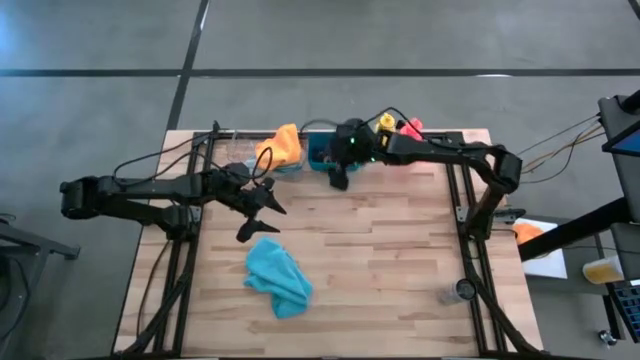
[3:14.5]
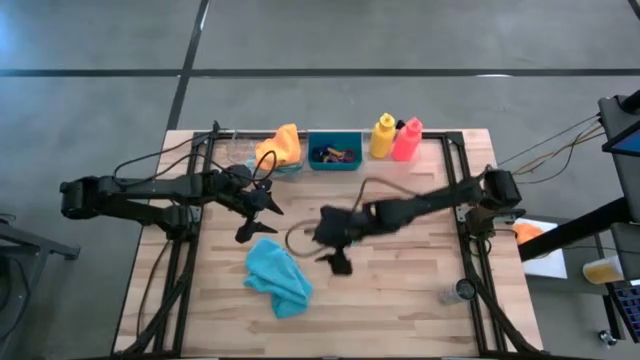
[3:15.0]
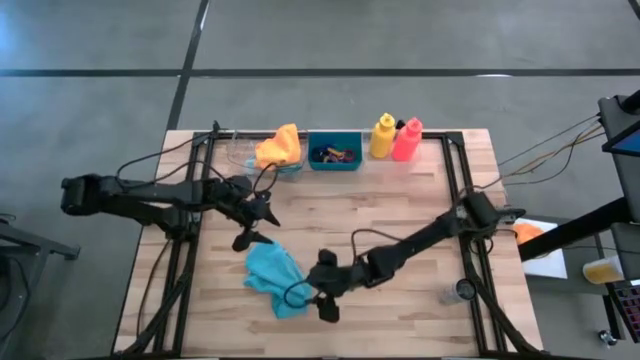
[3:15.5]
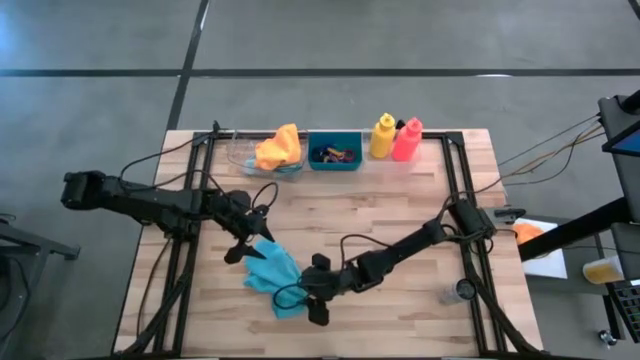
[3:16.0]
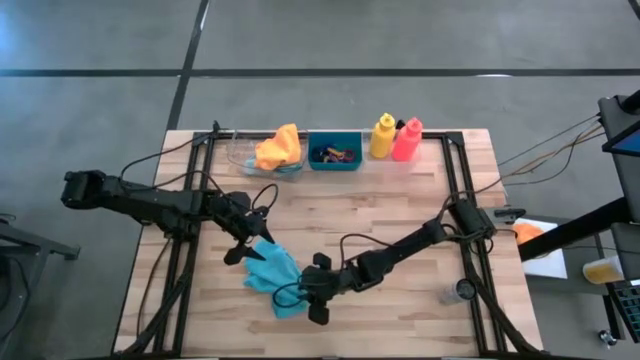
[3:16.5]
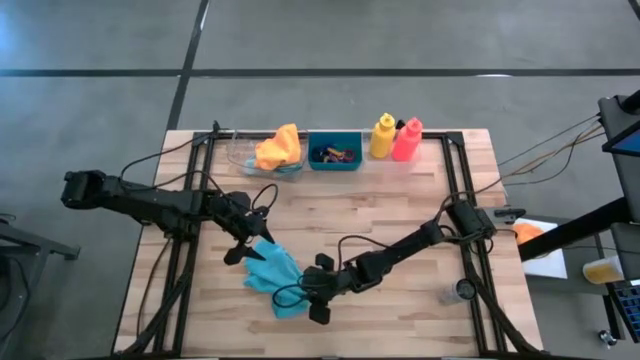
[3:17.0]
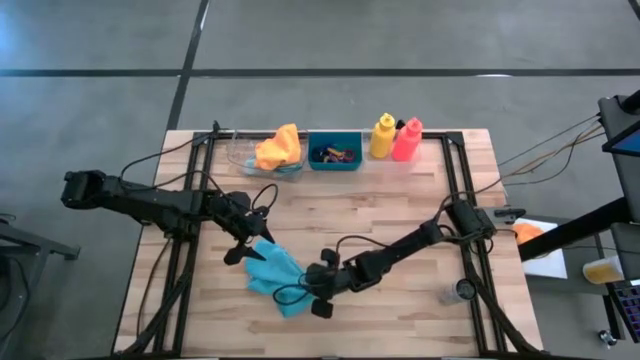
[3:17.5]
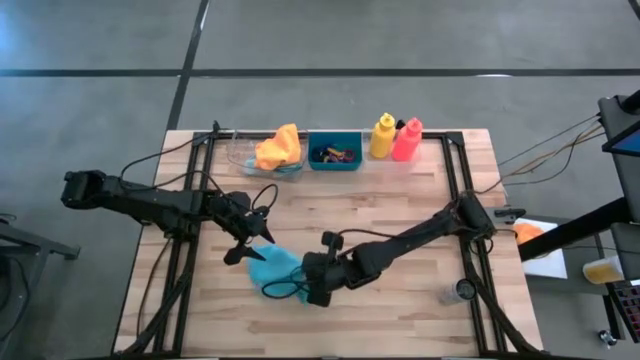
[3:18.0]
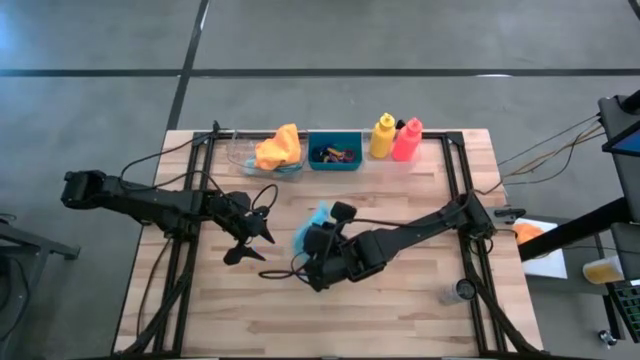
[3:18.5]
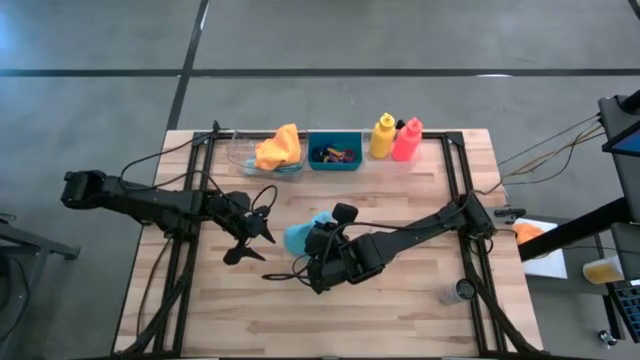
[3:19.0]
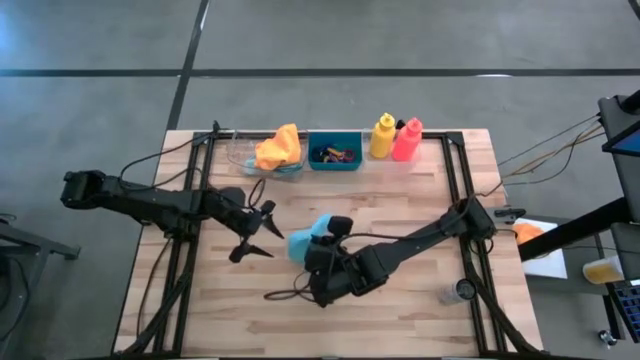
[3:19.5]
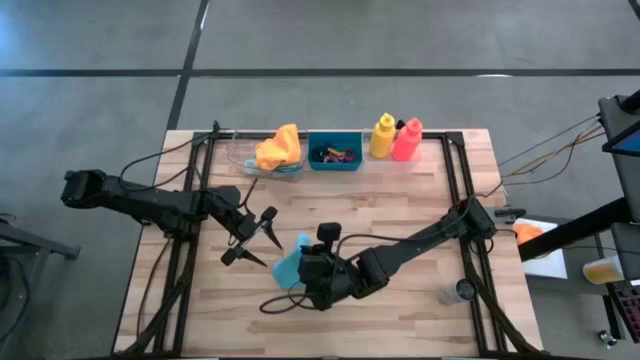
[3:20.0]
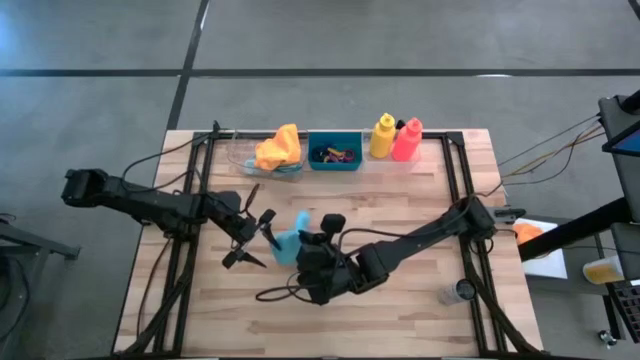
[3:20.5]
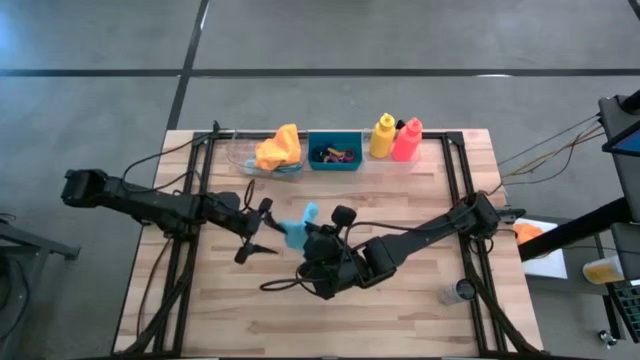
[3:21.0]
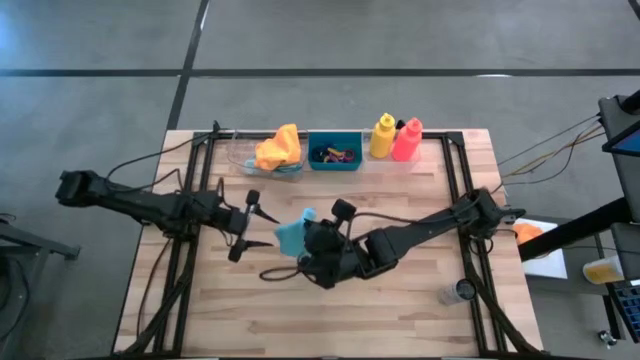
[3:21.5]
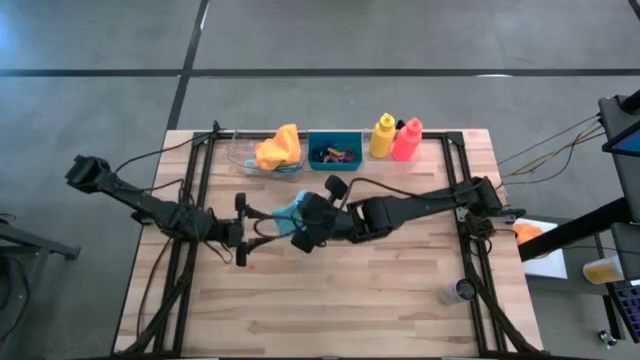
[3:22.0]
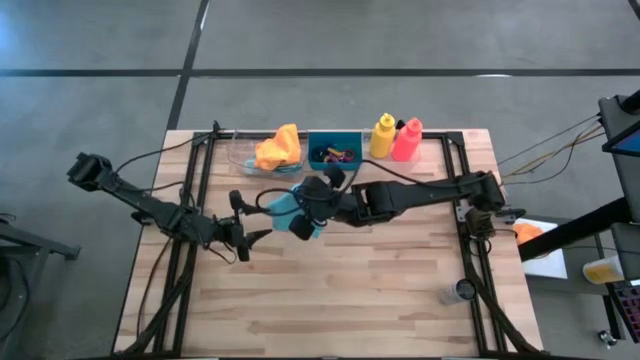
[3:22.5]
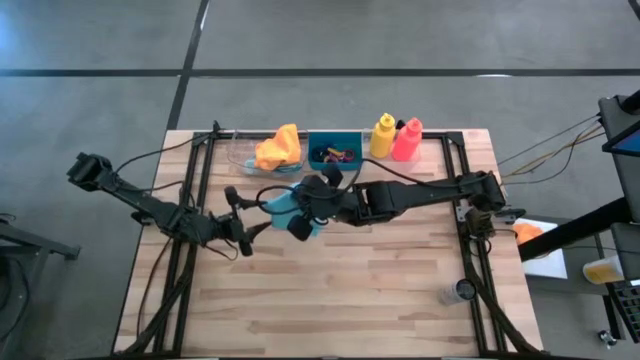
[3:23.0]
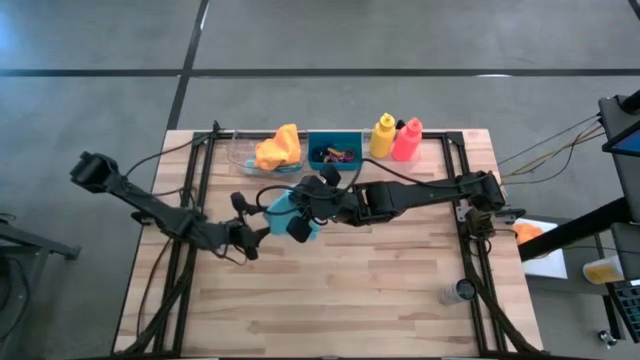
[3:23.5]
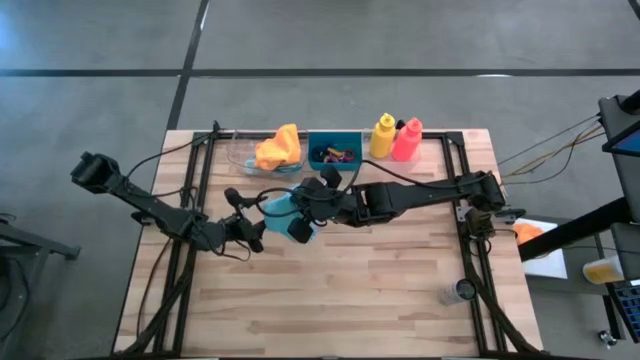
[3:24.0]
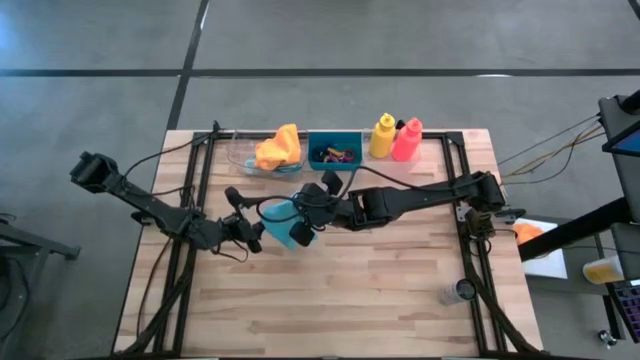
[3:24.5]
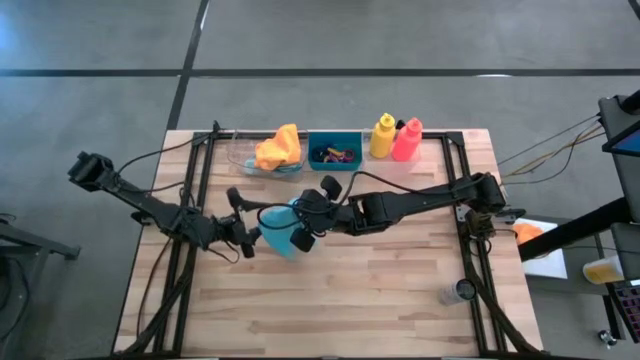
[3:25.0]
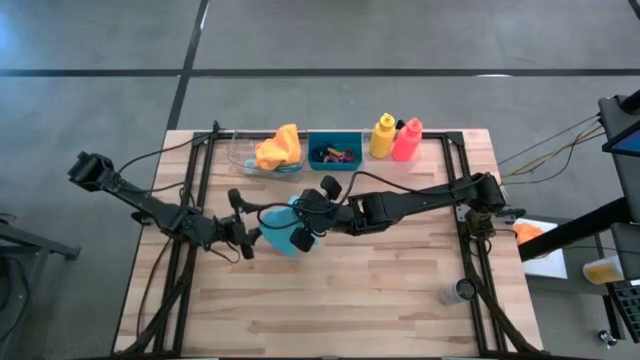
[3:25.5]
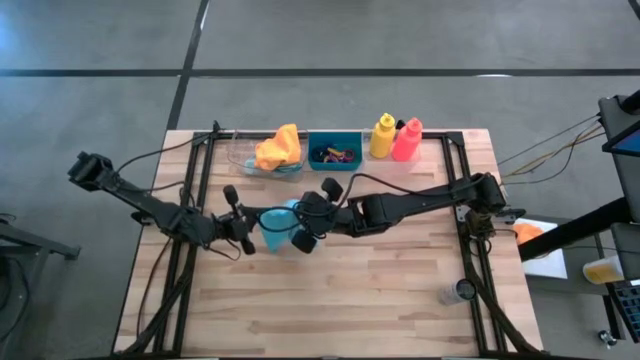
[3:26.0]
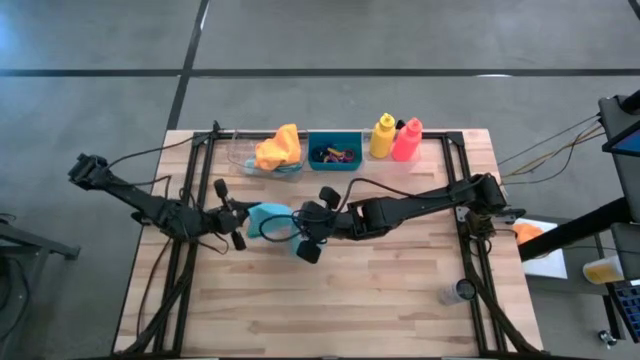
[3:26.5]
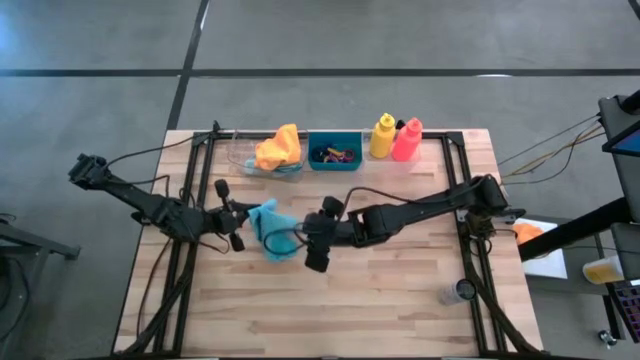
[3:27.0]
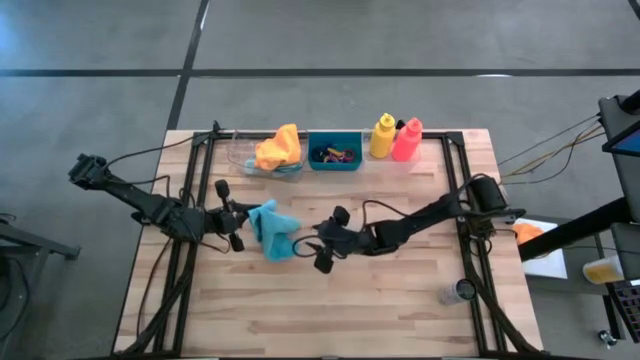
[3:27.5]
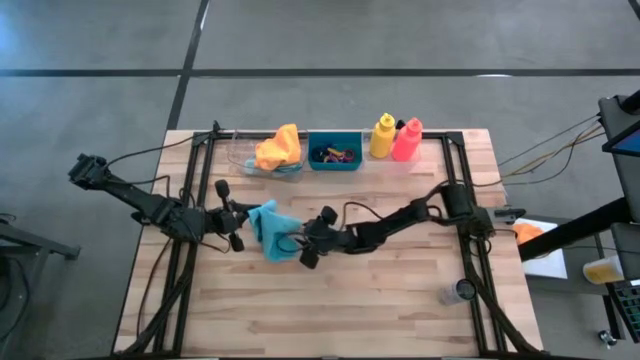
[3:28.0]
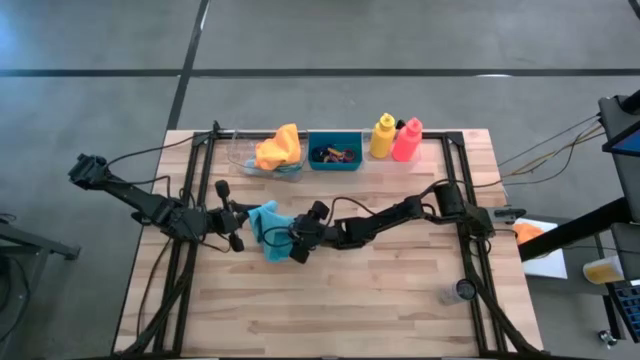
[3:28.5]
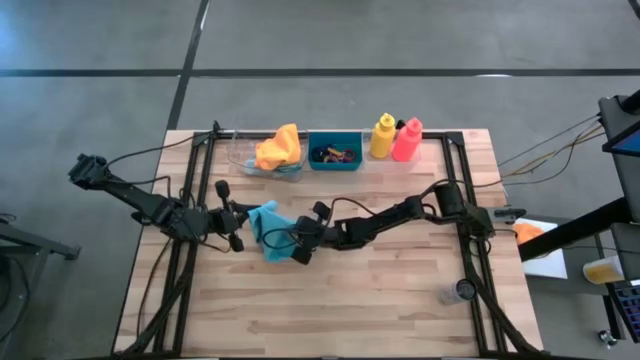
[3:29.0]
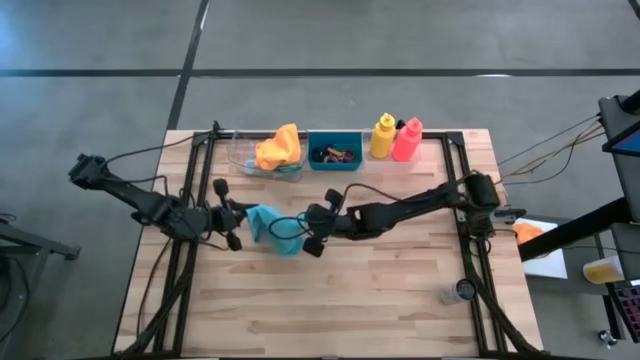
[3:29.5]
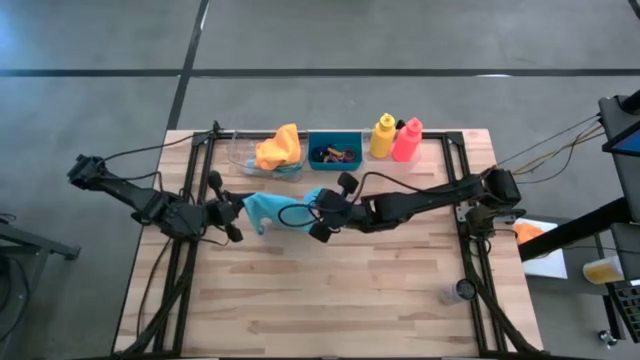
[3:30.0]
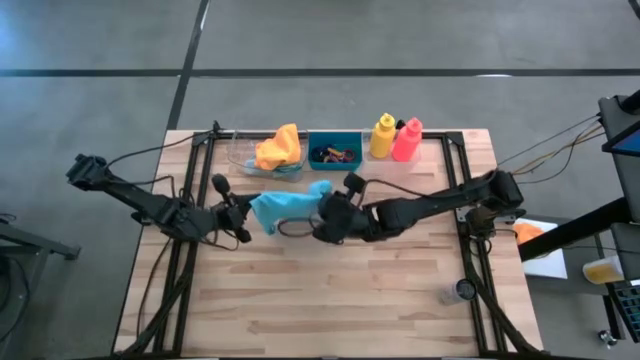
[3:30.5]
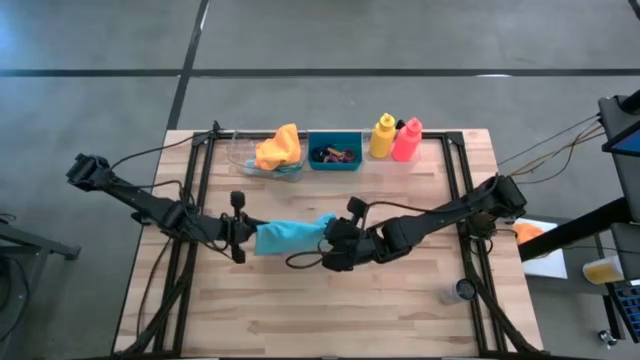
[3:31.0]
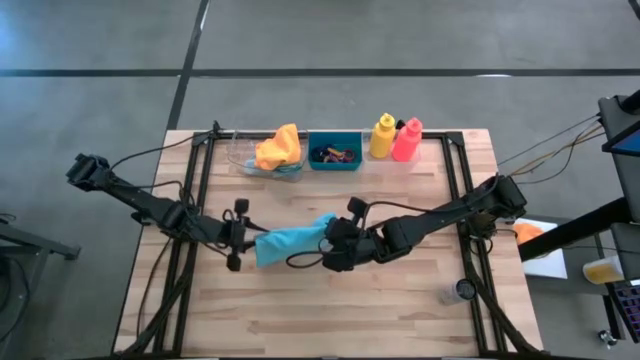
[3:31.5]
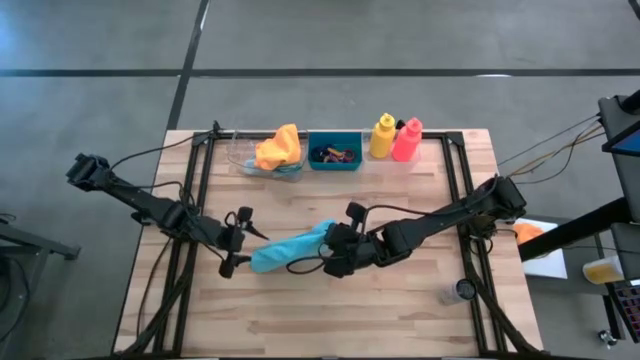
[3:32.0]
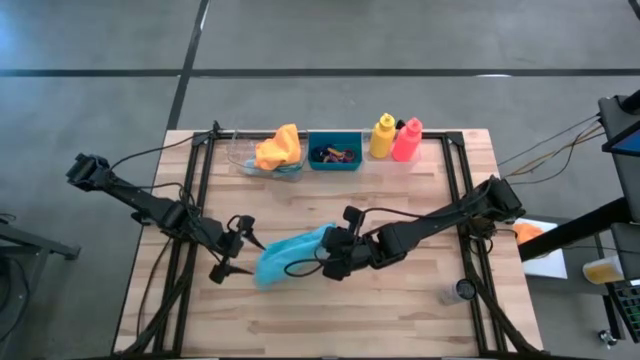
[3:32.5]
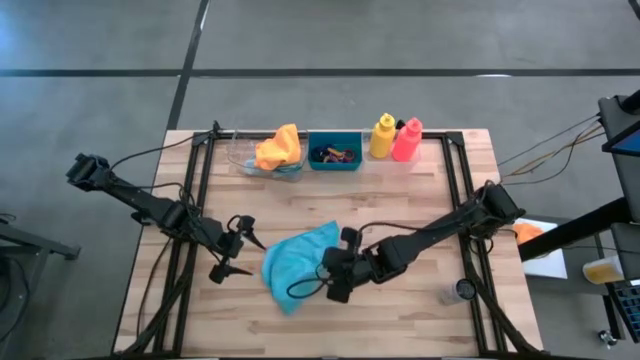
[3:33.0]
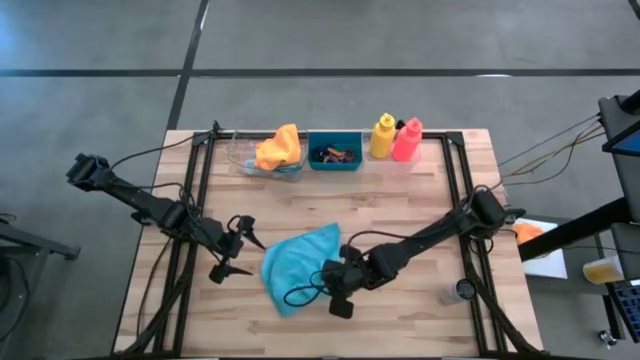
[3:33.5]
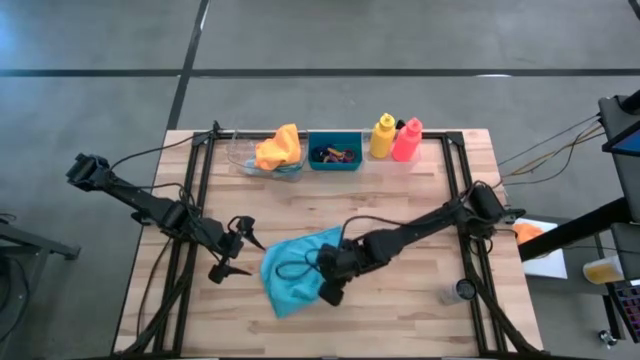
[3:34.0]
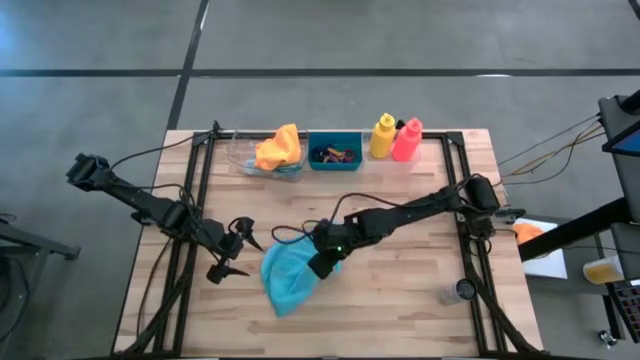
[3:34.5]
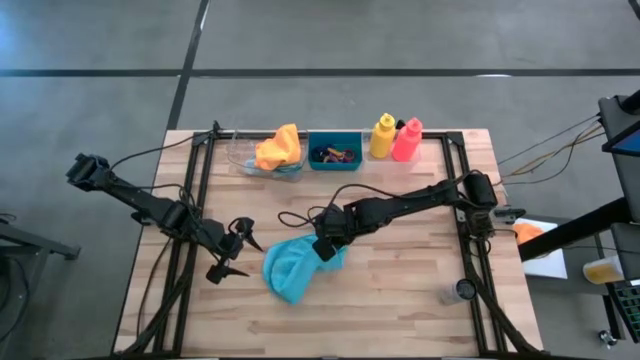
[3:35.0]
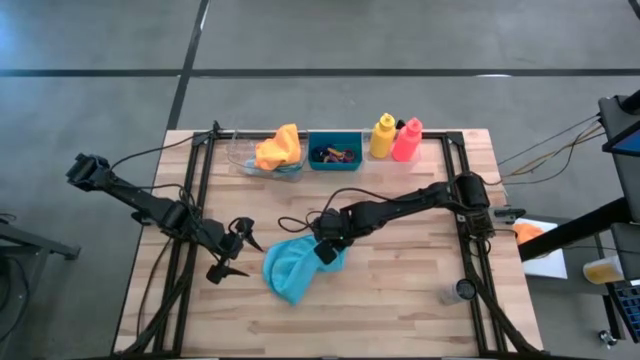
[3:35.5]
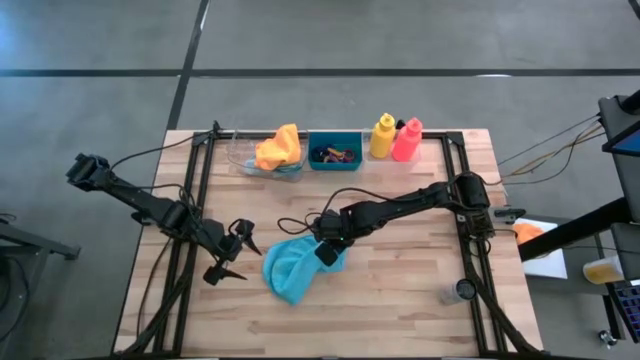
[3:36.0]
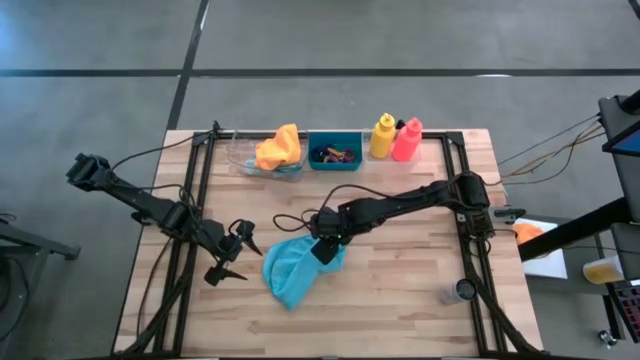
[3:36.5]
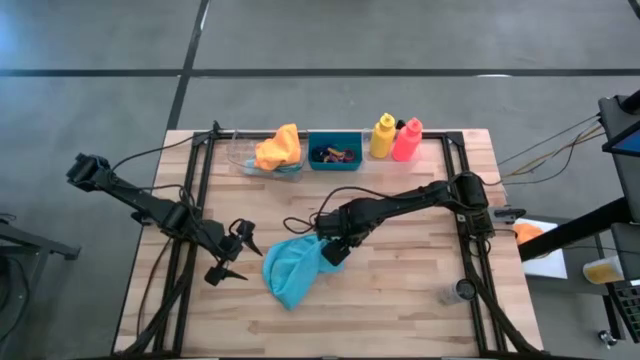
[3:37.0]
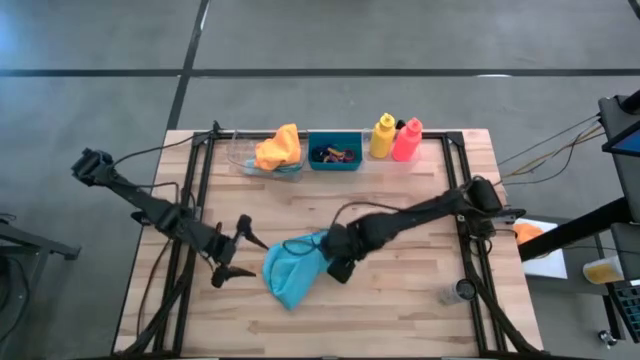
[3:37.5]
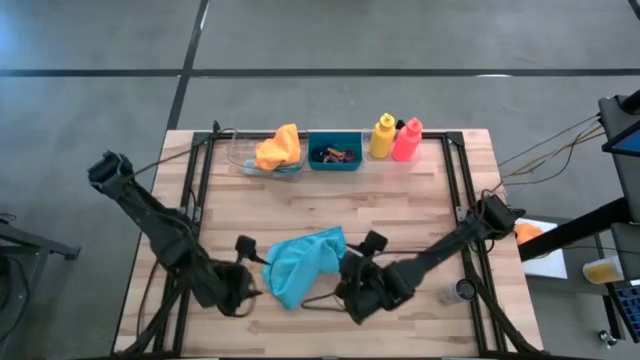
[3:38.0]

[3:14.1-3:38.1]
Task: Pick & Place Sports Items
Fold the blue towel
